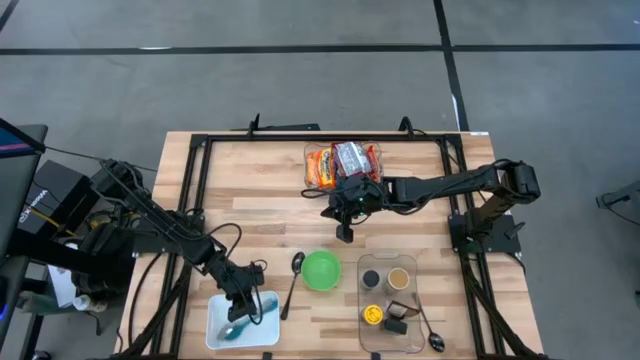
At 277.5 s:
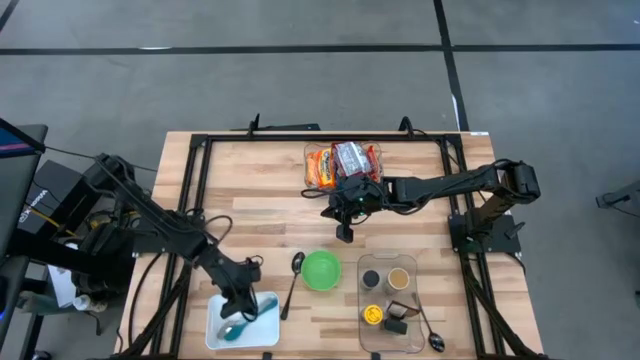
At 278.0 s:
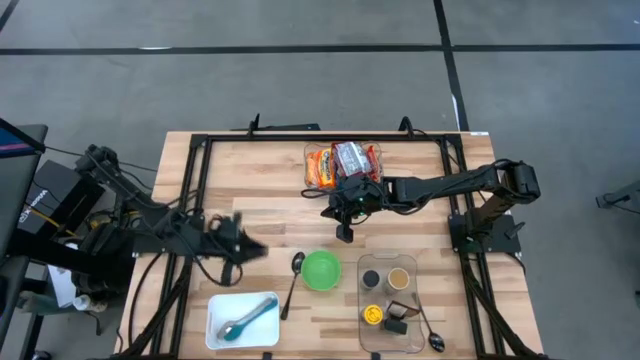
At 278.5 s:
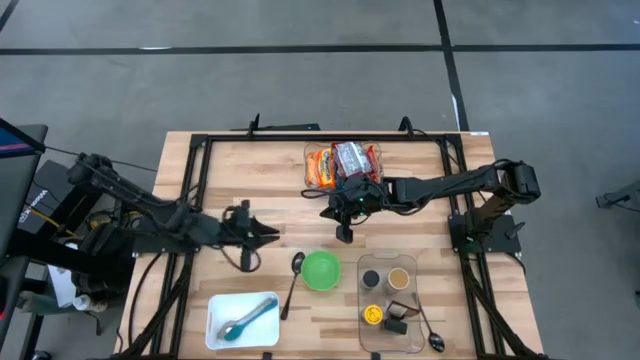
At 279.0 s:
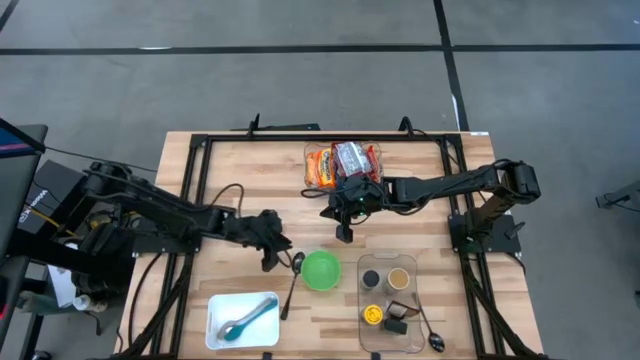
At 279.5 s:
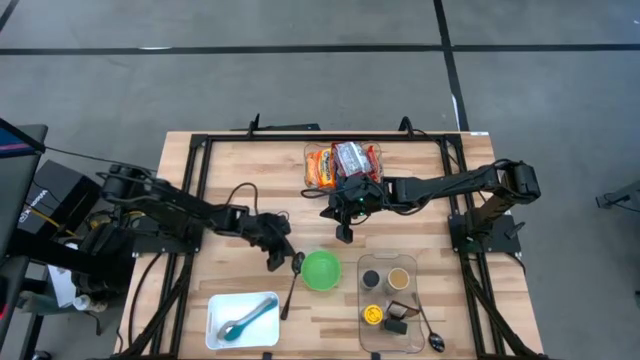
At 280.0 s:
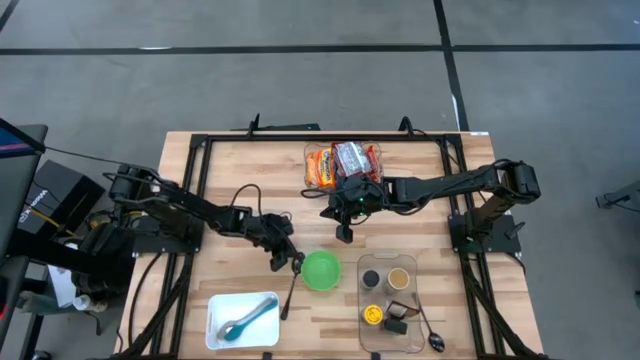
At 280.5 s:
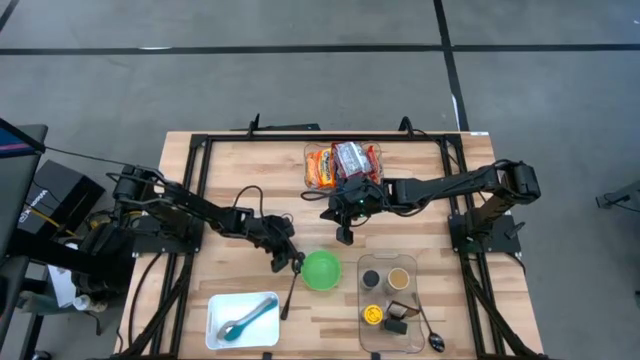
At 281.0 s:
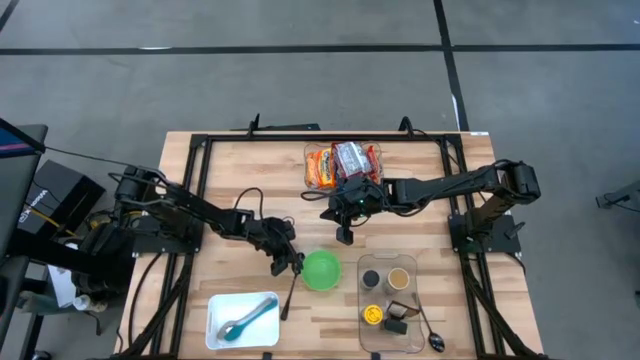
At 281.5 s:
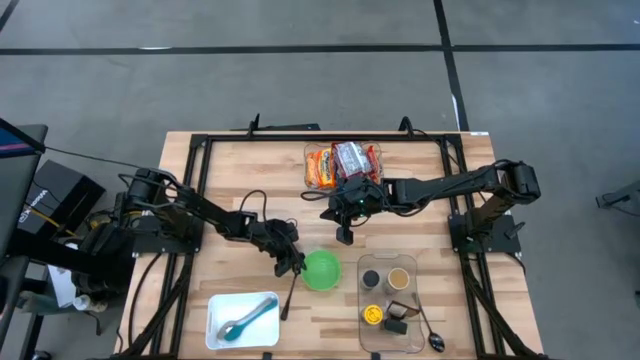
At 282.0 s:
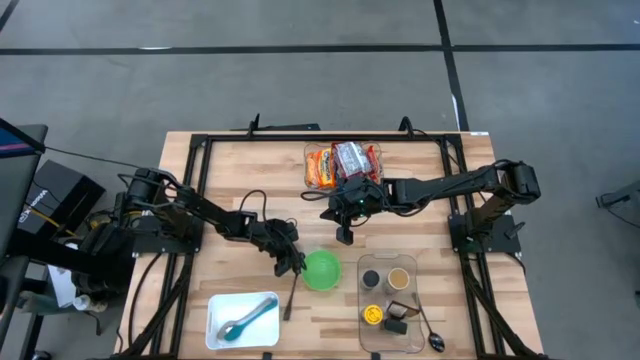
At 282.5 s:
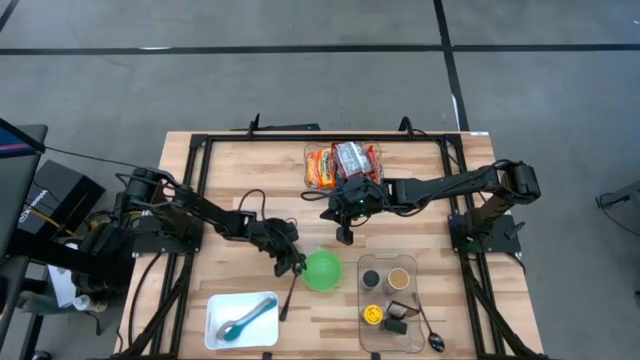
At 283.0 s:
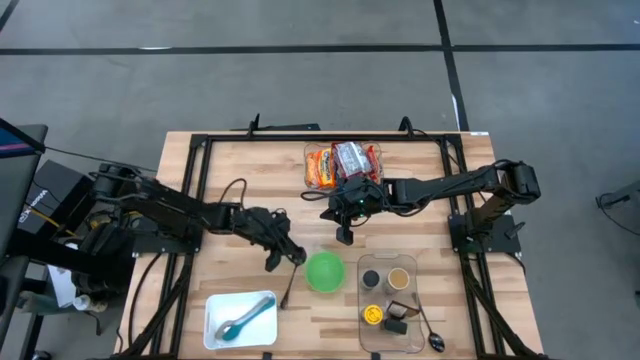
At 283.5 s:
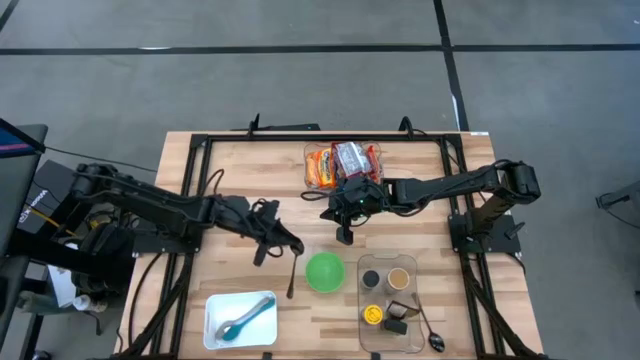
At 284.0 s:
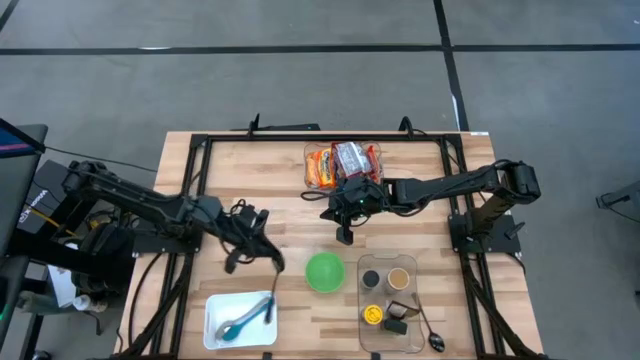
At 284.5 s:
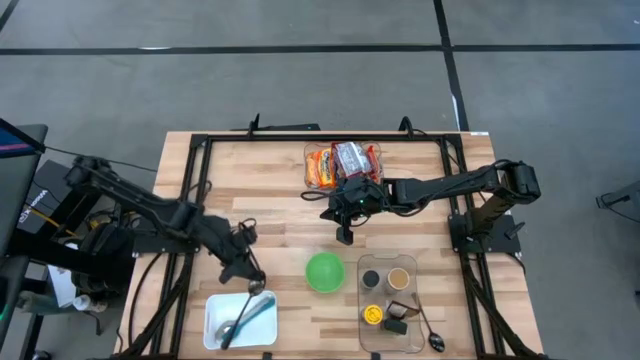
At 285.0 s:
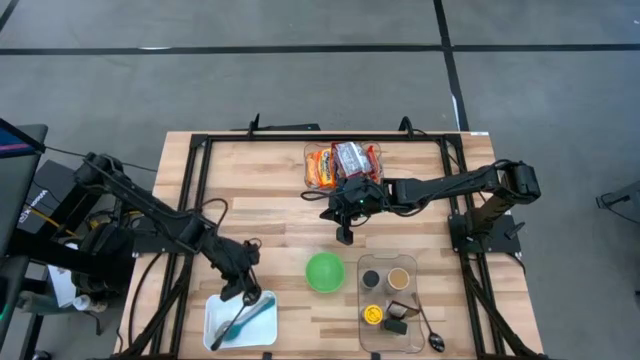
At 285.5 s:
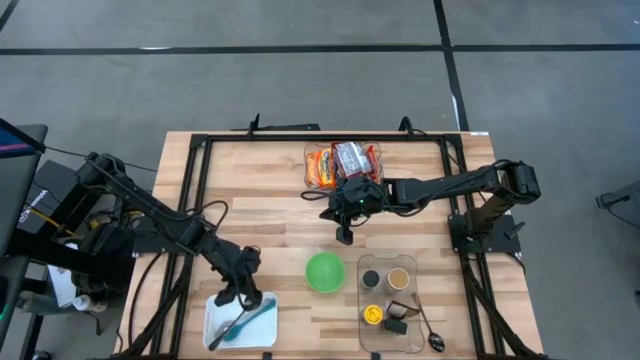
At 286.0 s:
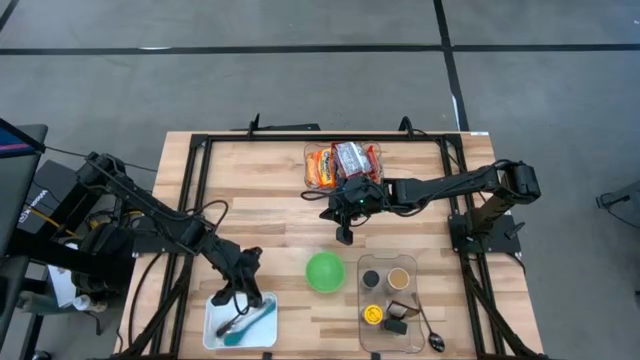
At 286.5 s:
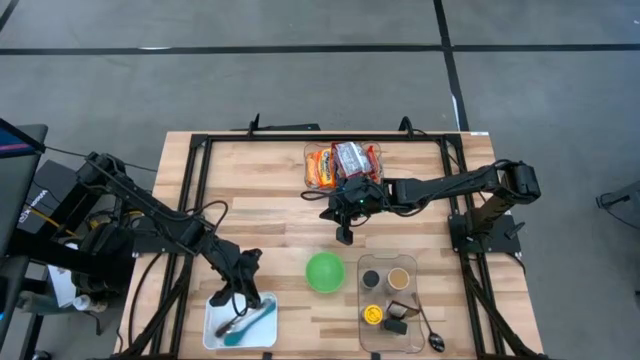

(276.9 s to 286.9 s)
Task: Pick & Place Food Item
Put the left black spoon into the white bin

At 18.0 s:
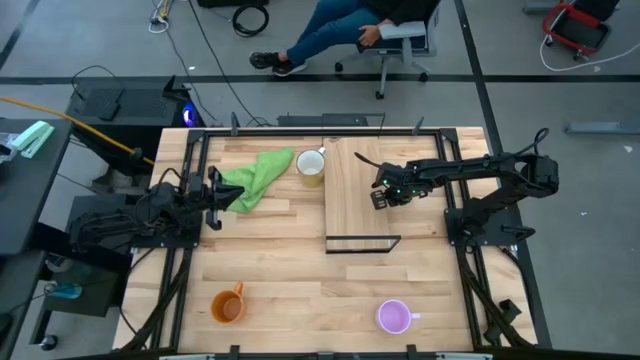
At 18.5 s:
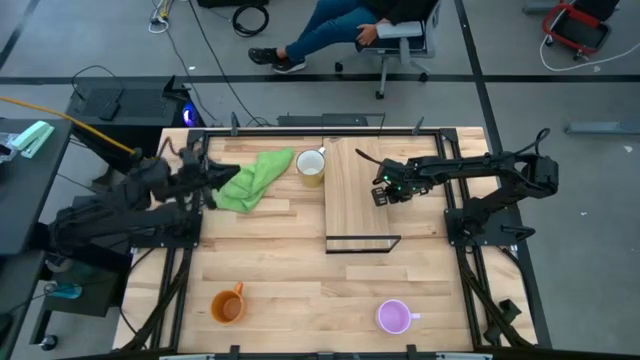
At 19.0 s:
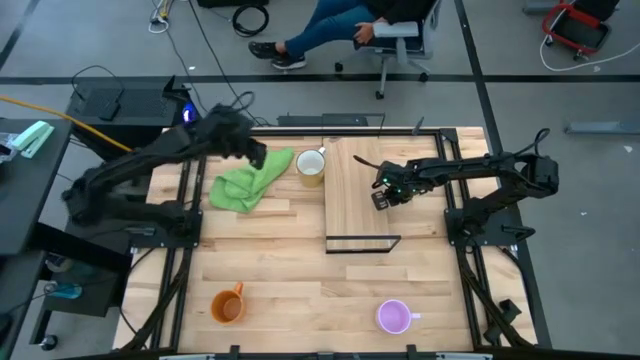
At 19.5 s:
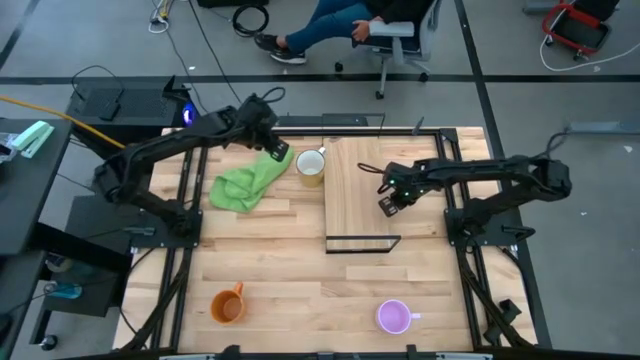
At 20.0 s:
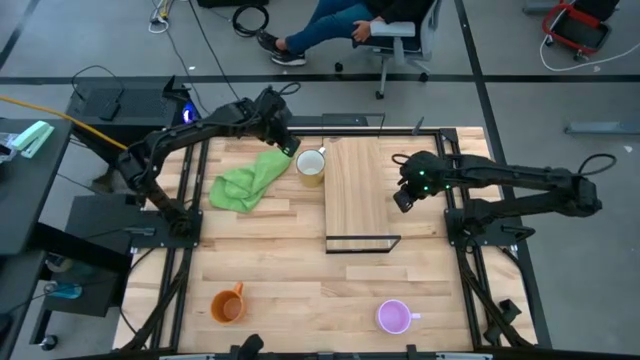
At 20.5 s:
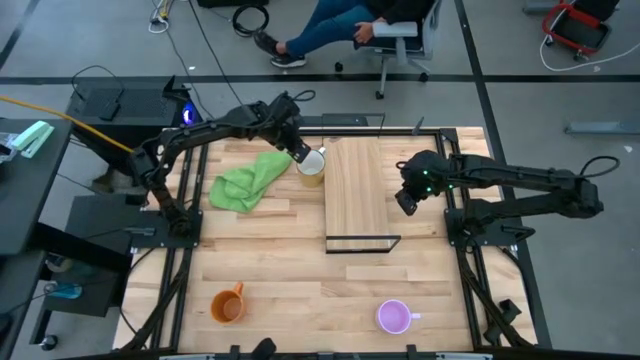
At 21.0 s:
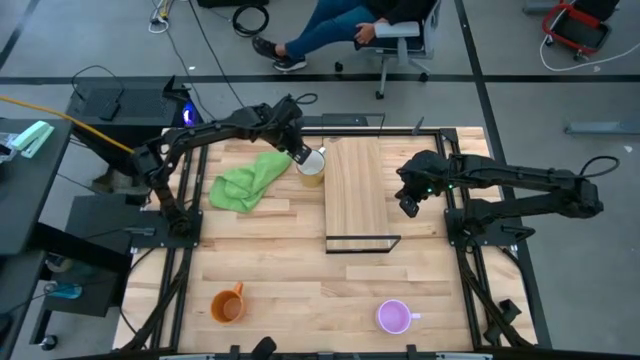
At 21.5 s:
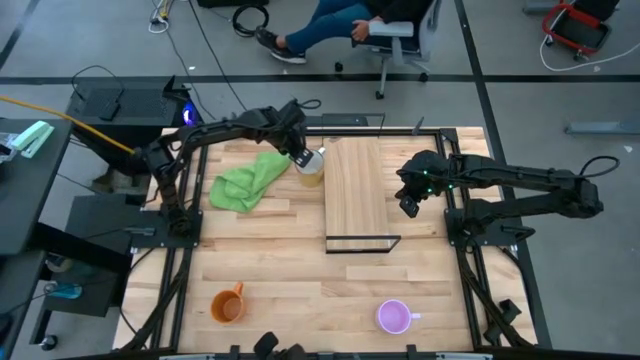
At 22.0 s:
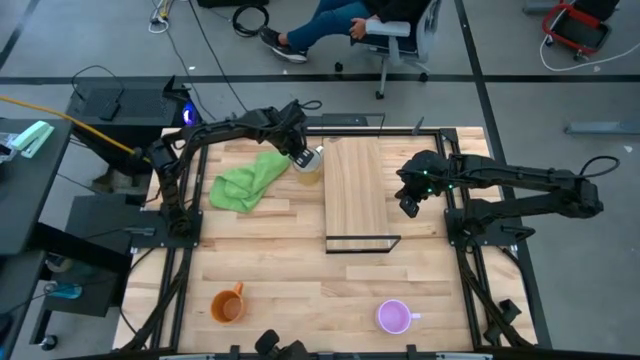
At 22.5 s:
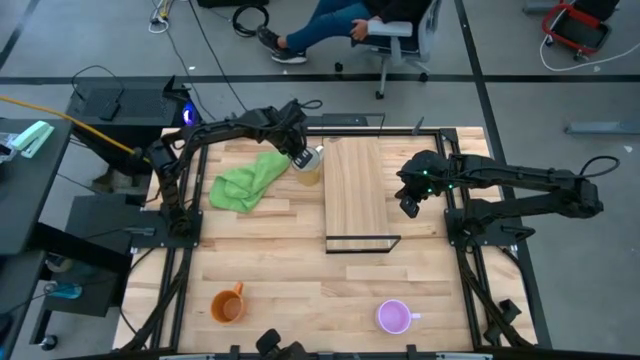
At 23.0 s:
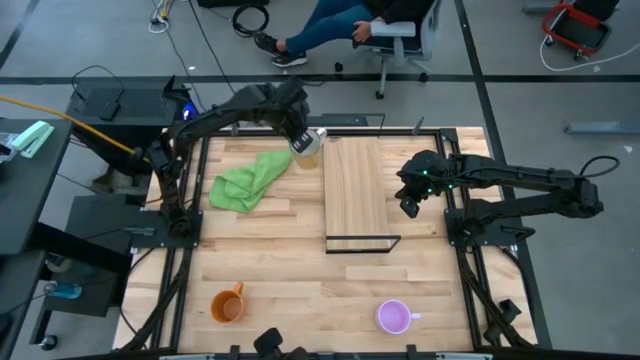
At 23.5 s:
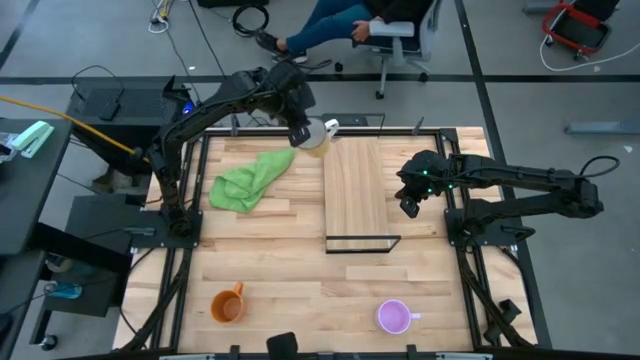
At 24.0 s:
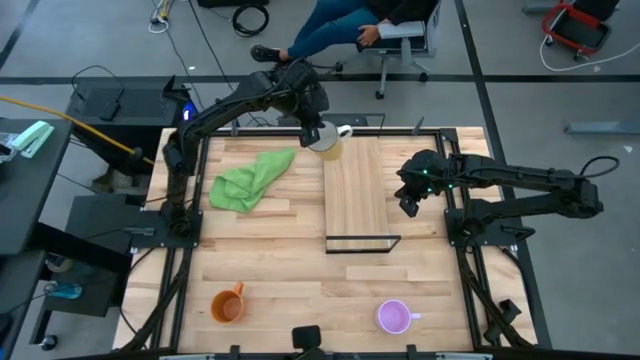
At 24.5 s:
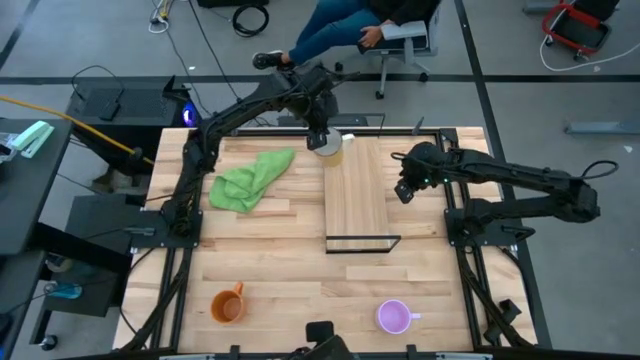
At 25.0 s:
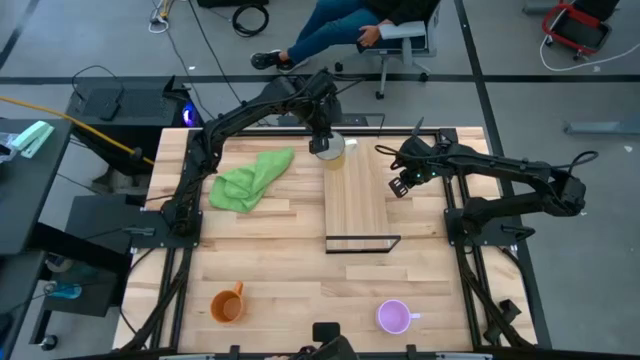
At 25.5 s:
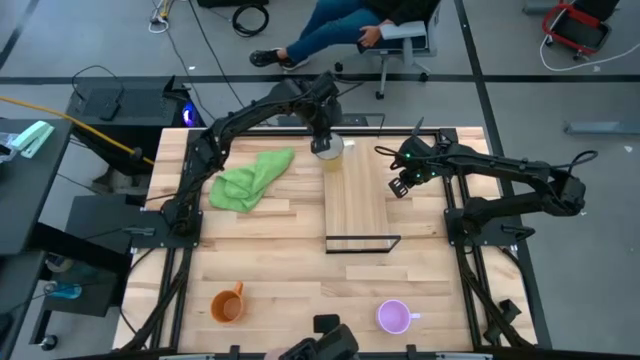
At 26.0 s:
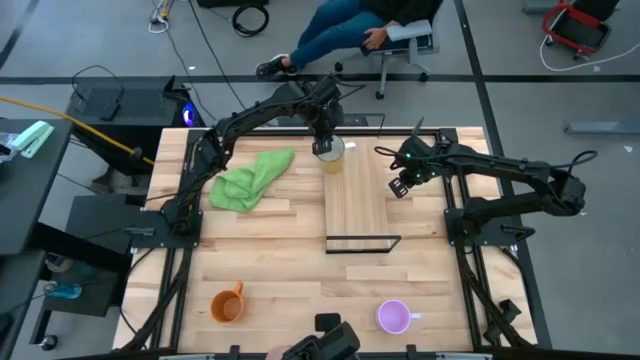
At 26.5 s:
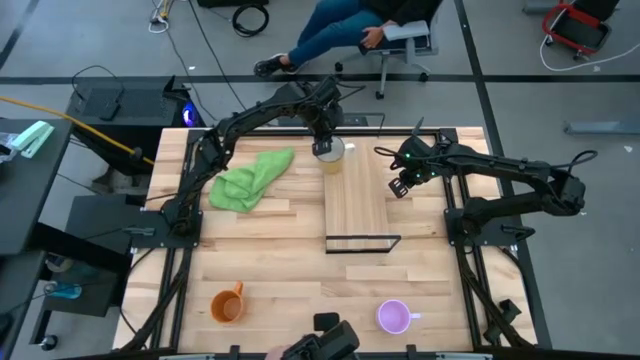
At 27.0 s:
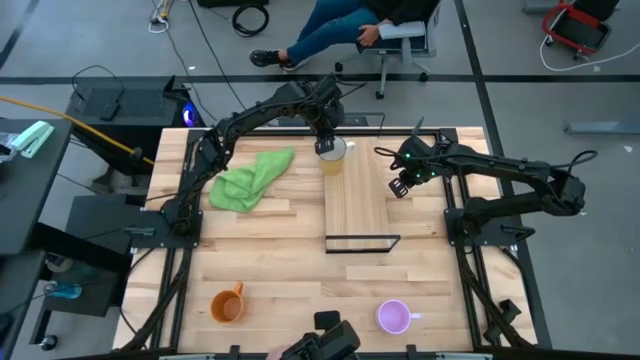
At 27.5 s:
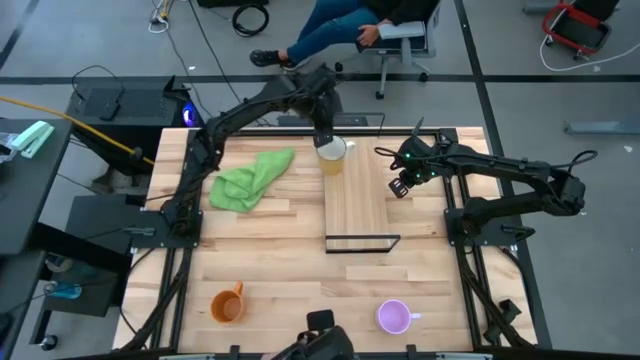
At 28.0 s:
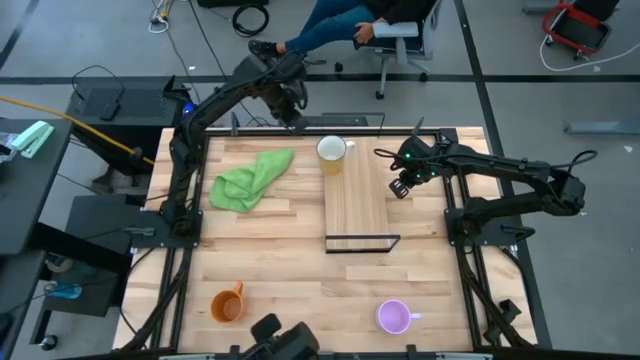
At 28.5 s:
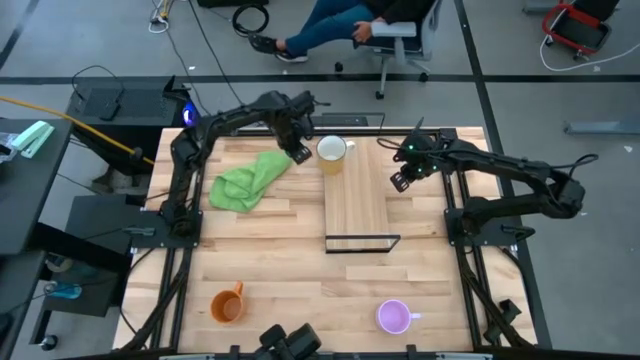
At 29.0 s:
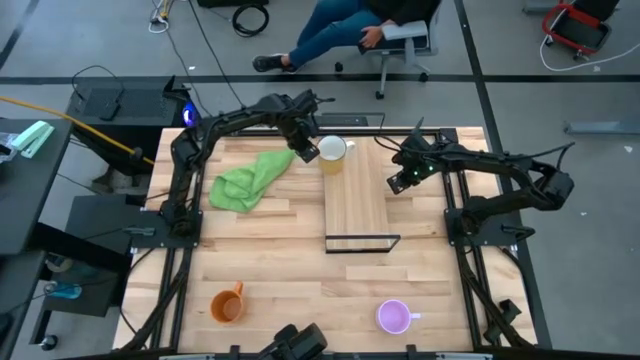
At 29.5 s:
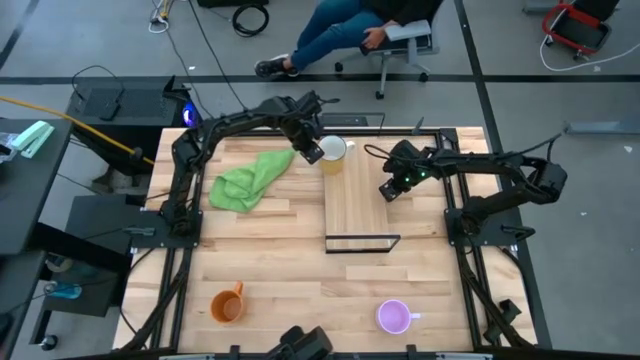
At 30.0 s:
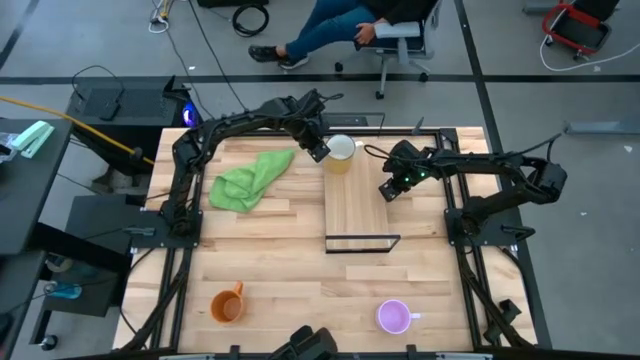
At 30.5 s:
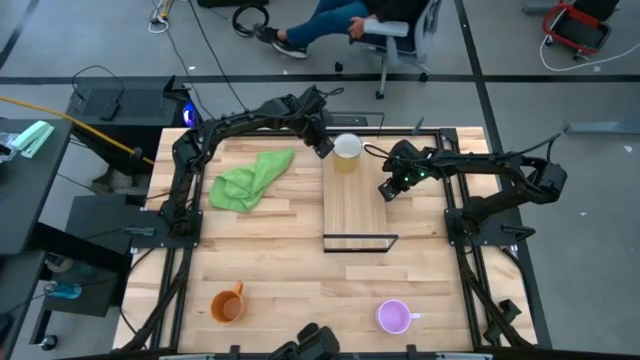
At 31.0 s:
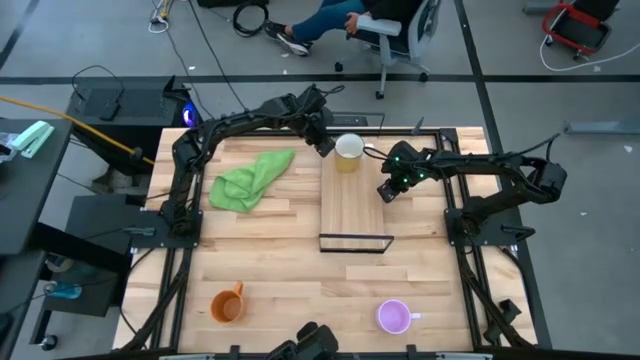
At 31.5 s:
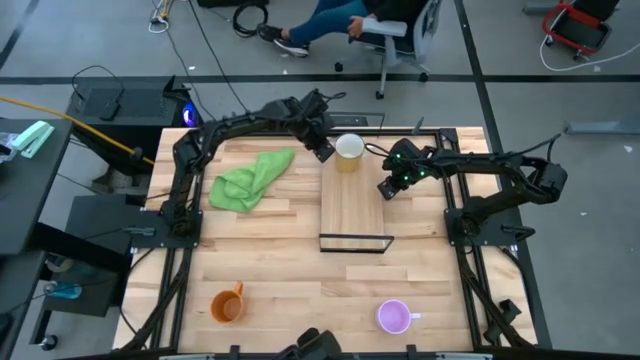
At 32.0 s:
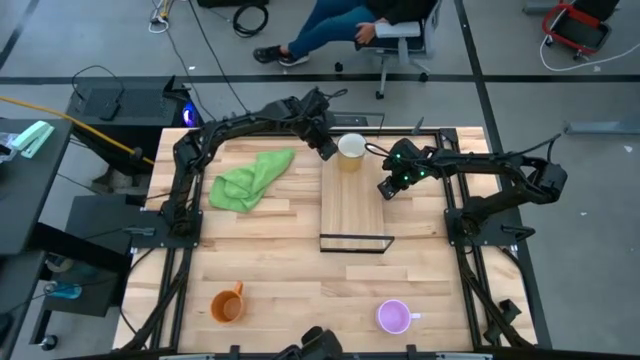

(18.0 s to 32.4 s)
Task: Stack small to large cups/mugs on shelf
Put the yellow mug on the shelf
